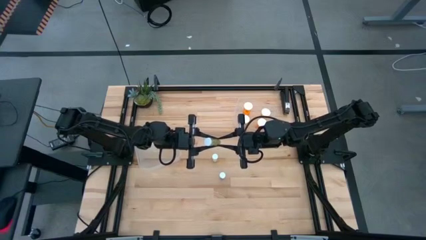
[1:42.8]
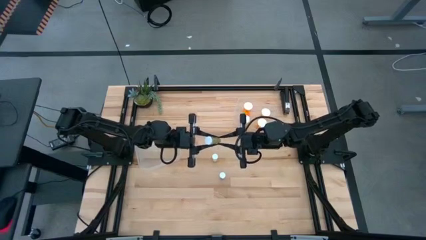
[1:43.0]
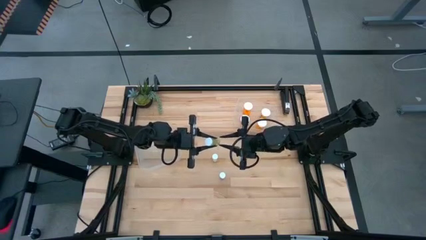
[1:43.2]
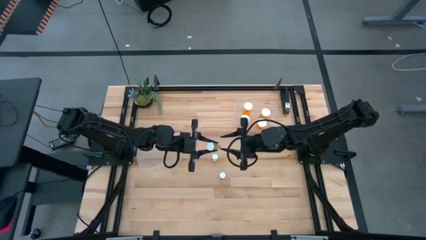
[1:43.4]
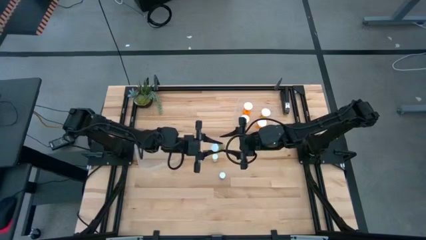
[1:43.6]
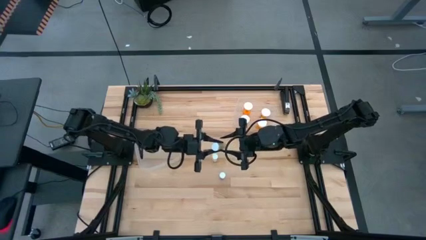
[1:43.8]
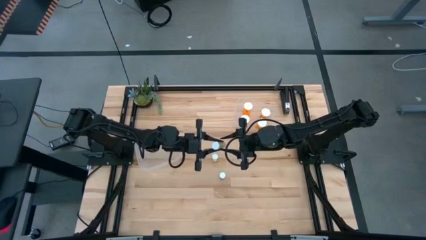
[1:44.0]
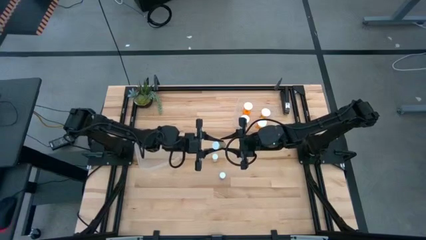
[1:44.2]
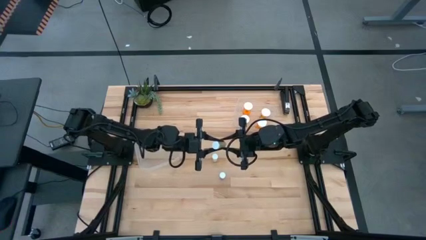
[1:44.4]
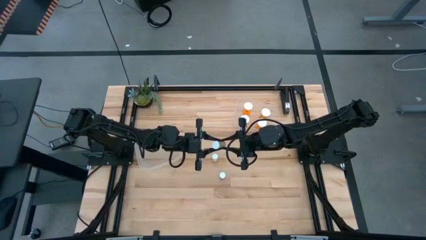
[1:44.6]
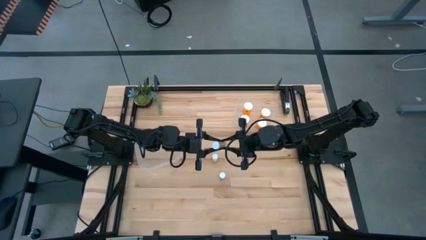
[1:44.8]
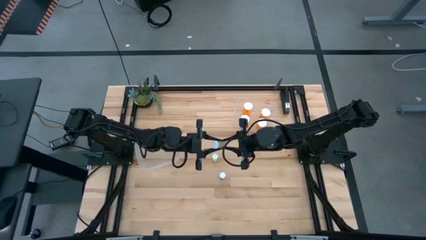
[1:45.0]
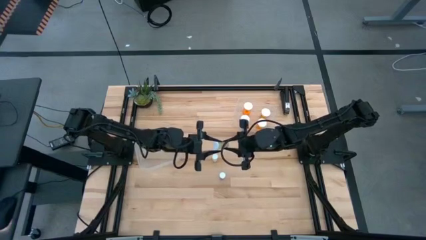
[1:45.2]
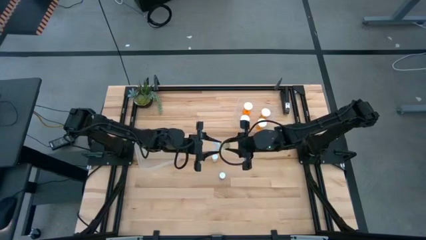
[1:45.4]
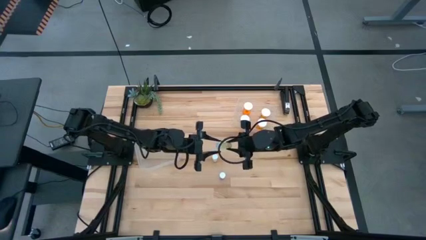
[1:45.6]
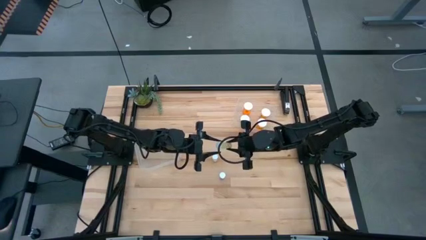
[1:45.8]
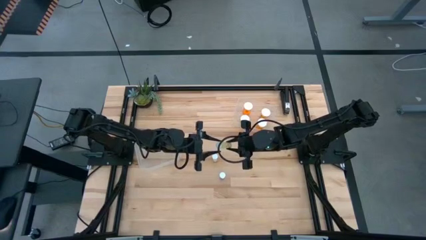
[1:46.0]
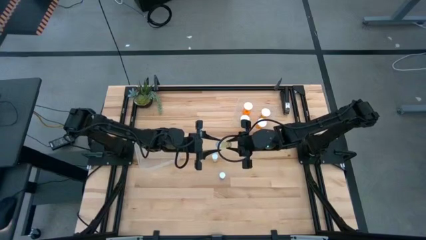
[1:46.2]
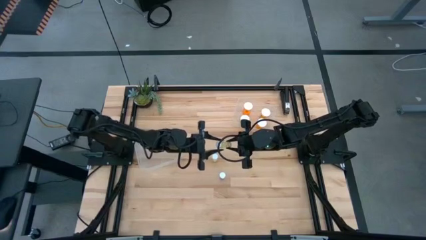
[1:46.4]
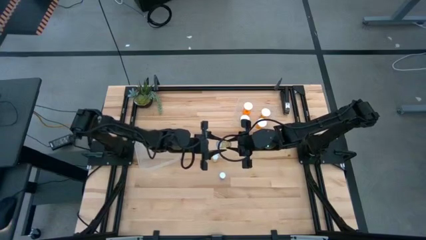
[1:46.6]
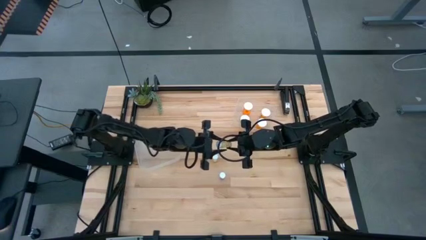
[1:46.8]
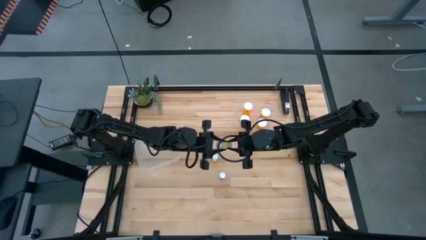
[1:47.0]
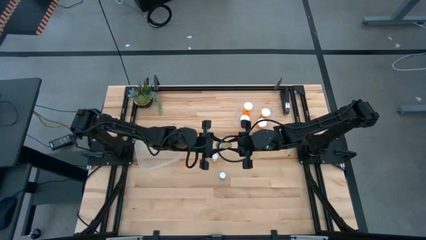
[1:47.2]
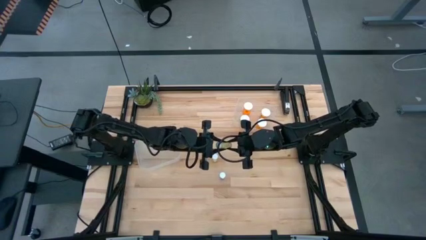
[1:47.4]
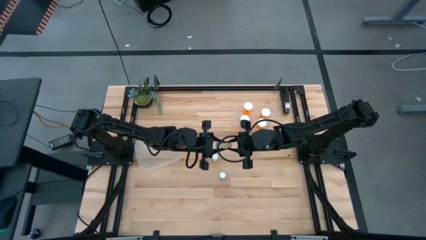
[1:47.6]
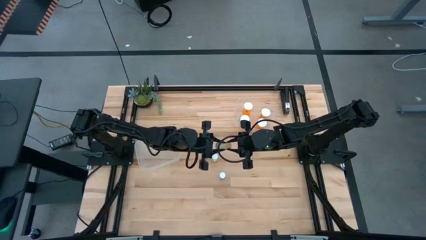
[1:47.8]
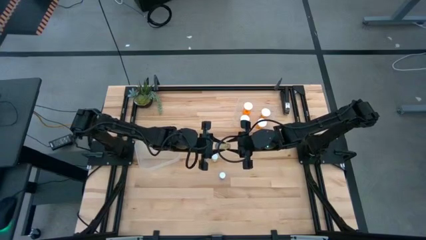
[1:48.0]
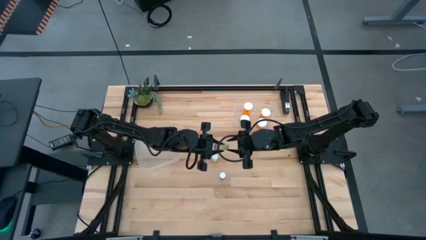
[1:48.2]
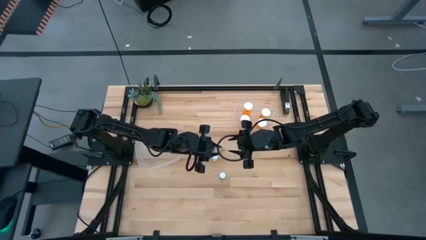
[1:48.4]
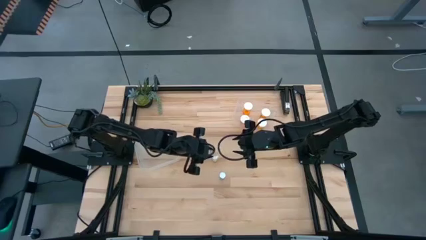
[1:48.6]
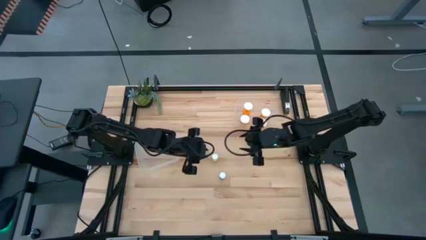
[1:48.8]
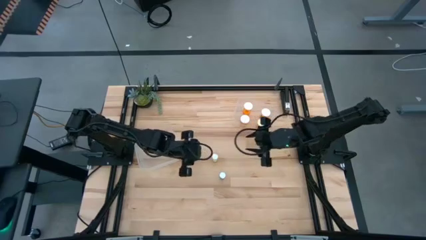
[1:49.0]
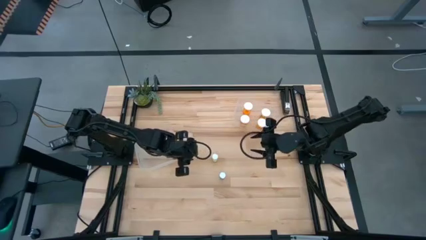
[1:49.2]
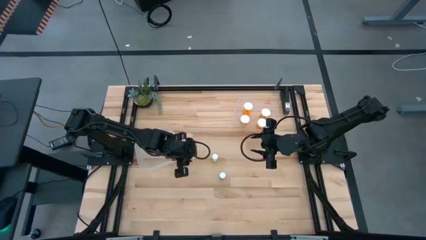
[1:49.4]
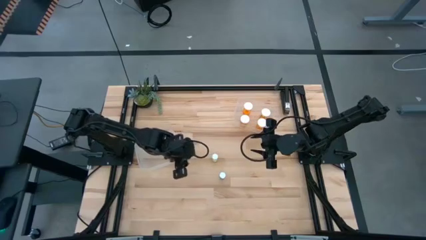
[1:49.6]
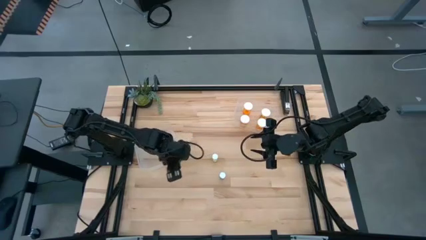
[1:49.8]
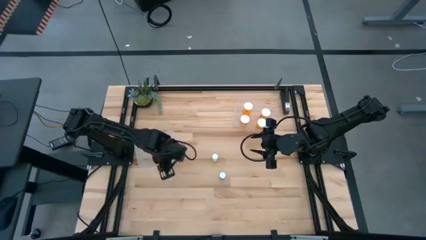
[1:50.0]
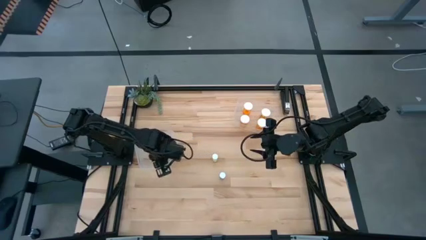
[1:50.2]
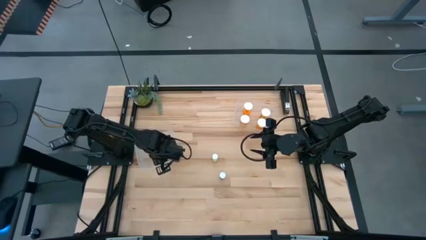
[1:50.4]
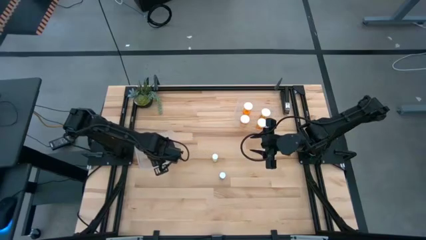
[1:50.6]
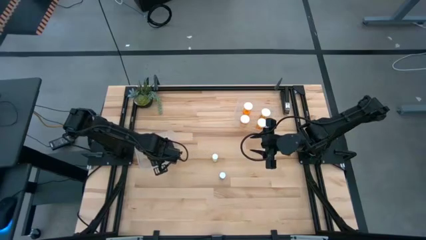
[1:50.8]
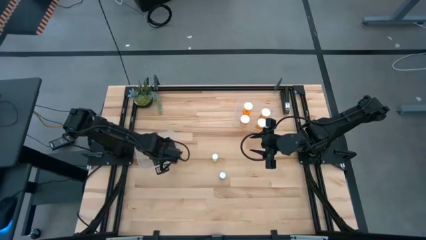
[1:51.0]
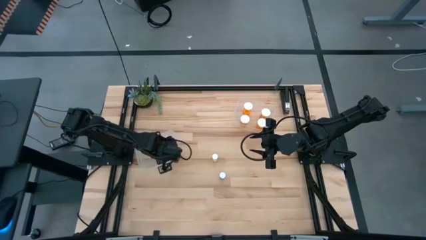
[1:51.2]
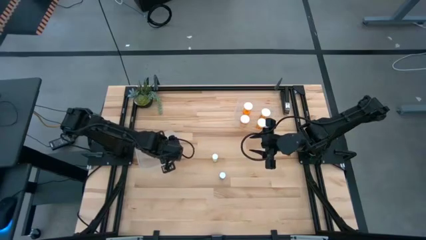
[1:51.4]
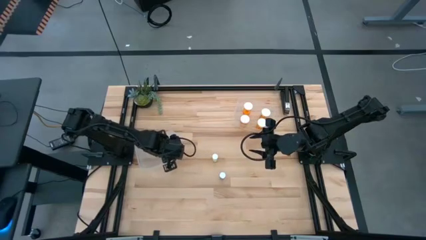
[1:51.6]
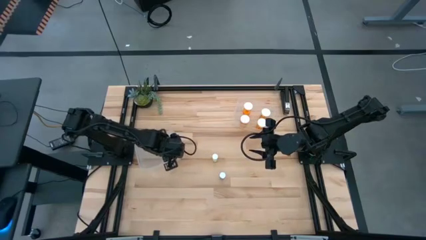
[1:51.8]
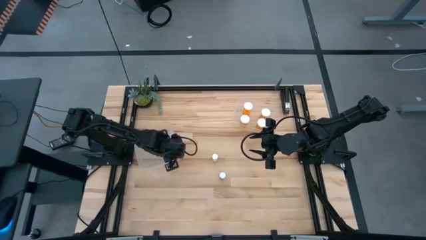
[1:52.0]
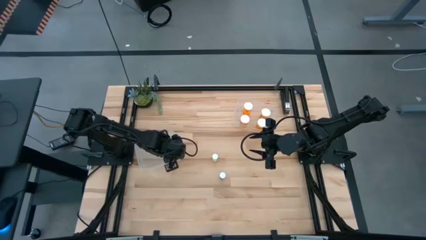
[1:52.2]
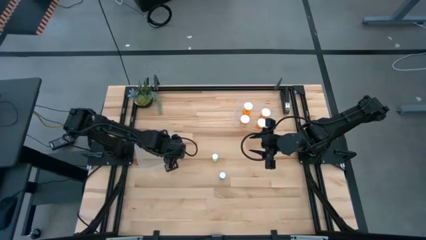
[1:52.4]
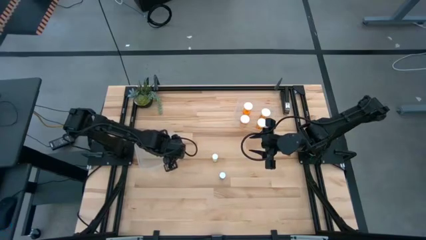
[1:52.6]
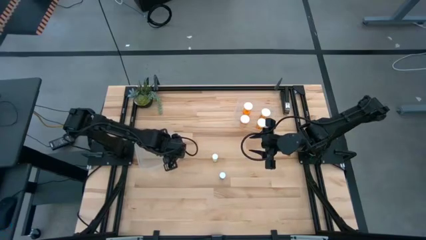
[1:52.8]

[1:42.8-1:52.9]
Task: Pick and place medicine bottles into bin by pill shape (circle, oval)
Adjust the small orange pill bottle in the left transparent bin

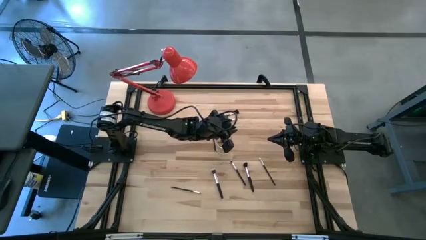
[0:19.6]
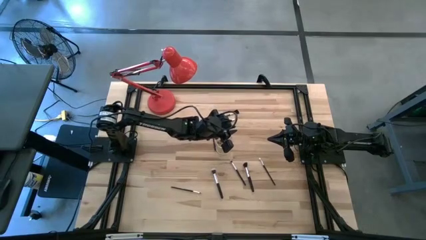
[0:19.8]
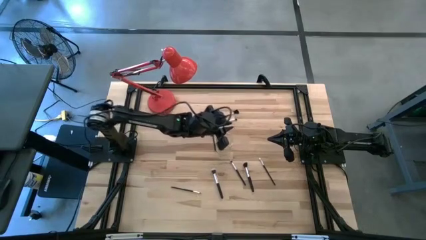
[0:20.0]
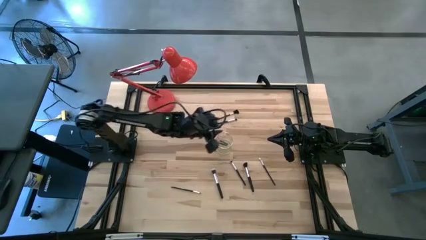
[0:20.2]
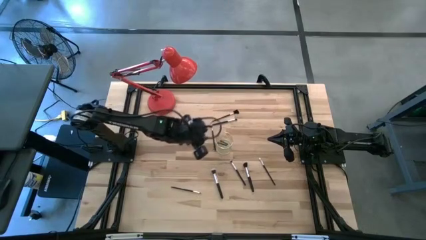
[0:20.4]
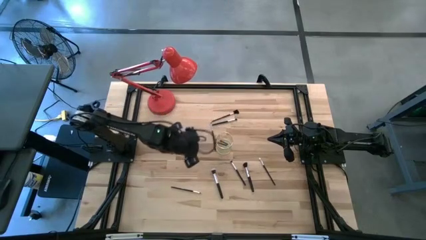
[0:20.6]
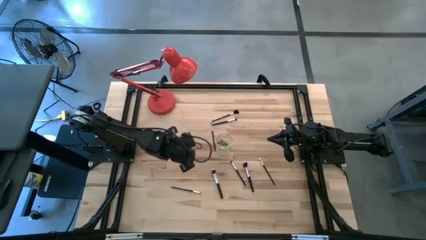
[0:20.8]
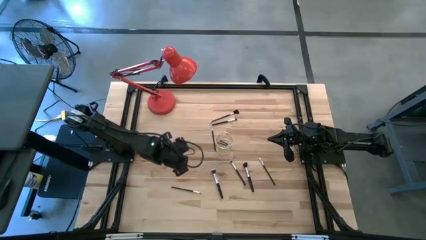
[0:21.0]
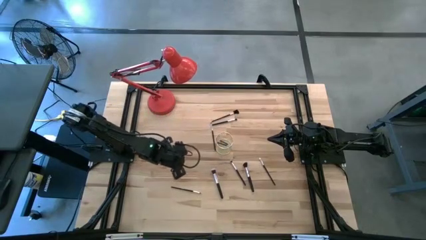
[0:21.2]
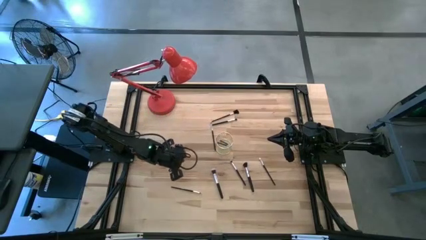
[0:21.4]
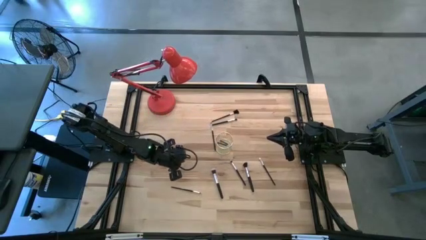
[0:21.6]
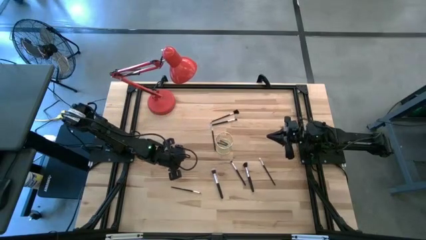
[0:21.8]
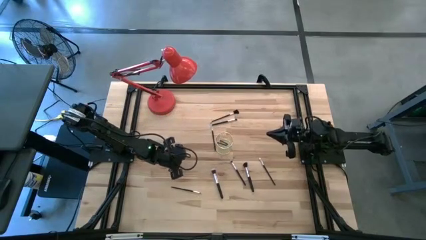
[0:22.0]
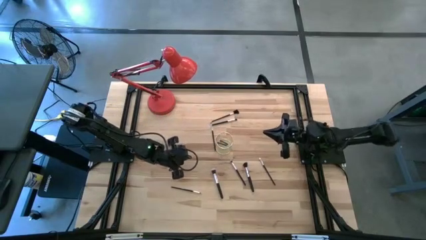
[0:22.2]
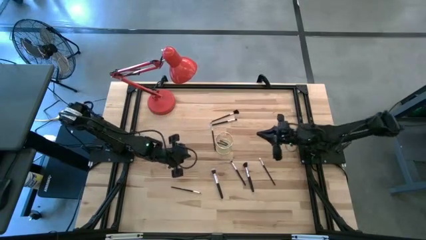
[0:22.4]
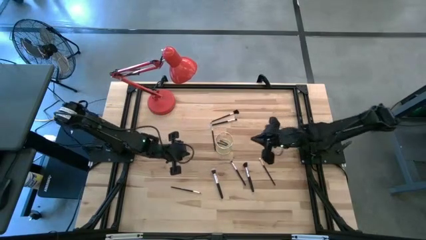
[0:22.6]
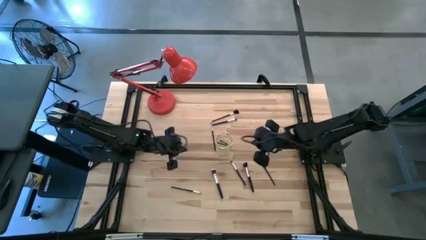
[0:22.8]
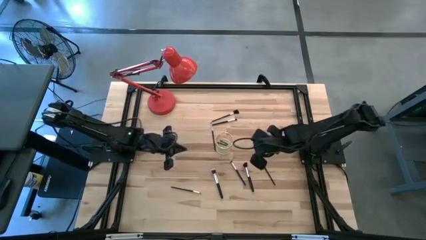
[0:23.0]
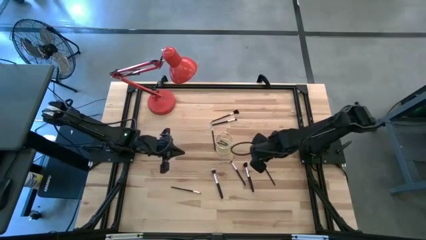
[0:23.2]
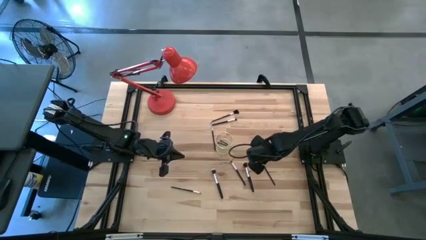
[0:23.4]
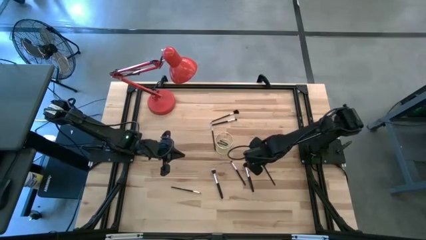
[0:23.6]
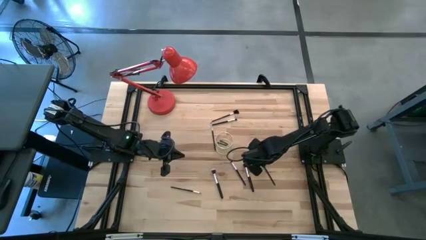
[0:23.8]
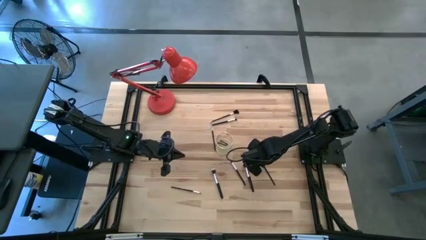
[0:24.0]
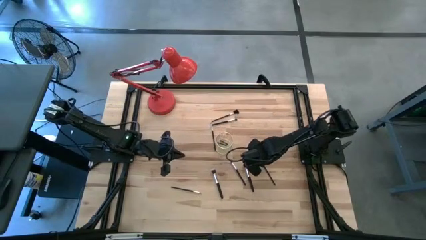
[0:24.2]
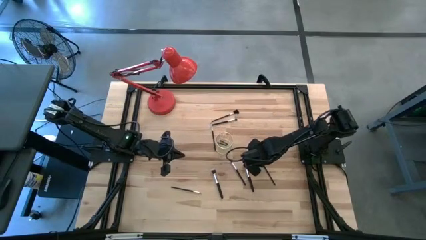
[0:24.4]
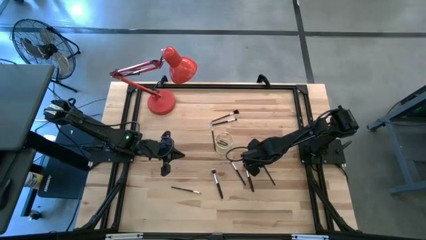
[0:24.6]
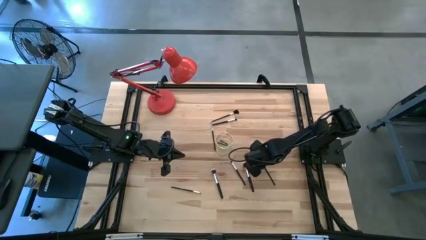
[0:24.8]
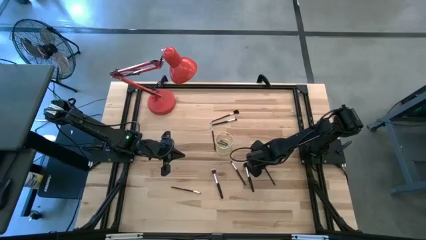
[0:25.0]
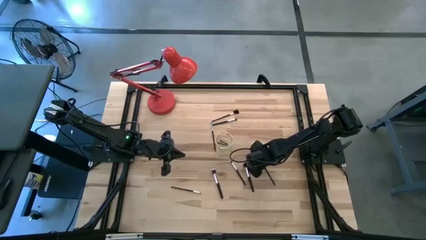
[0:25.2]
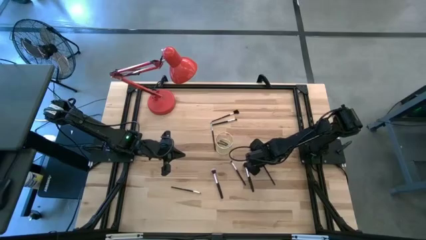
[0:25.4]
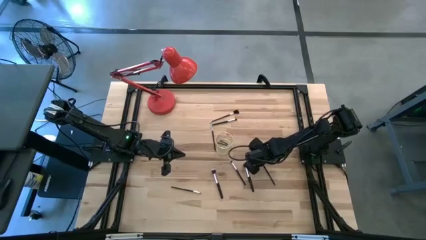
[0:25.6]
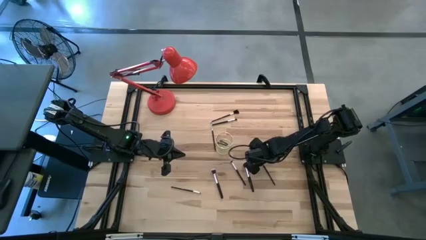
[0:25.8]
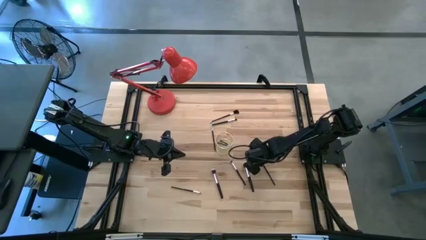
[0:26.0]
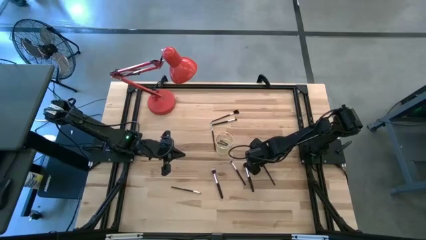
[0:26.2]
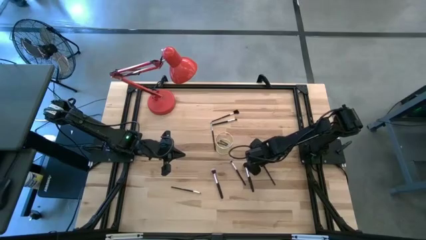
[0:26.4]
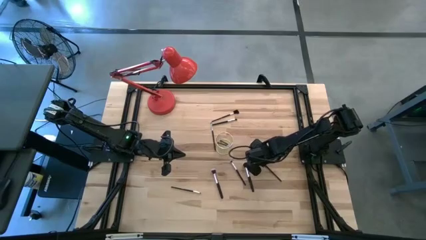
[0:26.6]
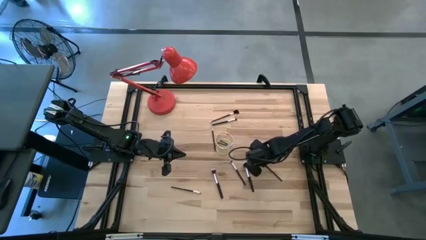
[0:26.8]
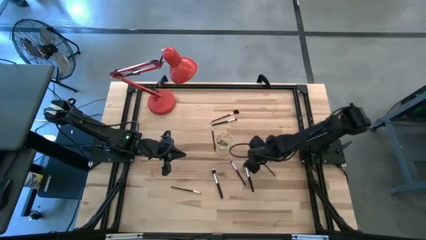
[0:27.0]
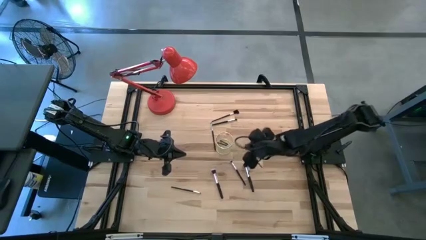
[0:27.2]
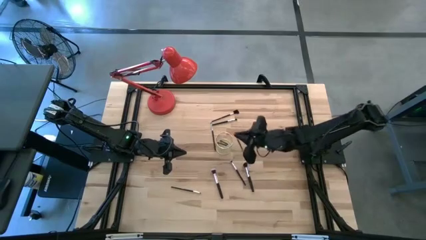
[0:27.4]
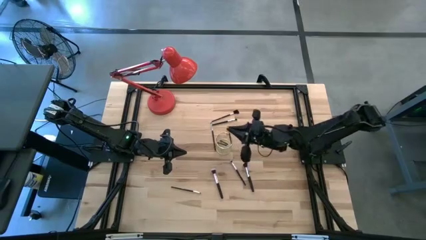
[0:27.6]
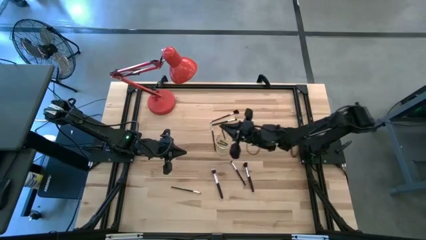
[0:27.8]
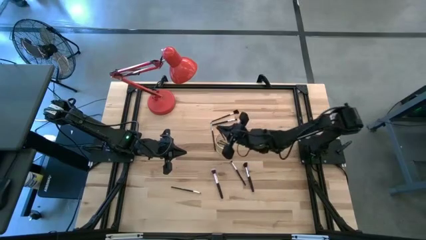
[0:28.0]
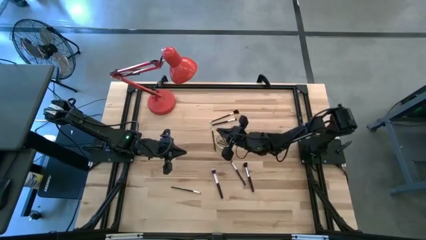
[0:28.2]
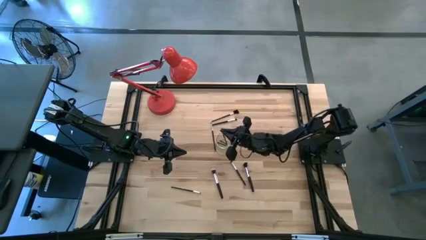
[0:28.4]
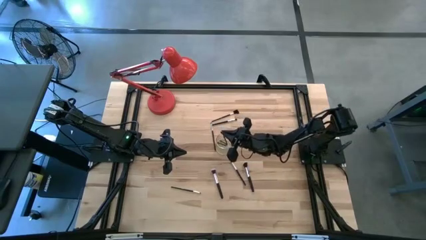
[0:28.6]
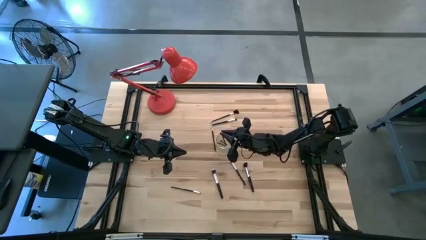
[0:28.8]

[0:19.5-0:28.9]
Task: Put items in baskets/containers
Put the eyeshadow brush into the wire organizer
